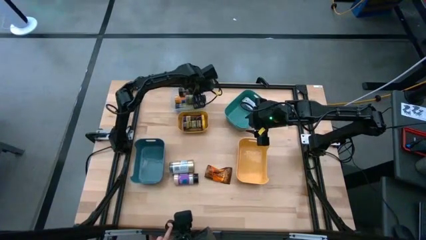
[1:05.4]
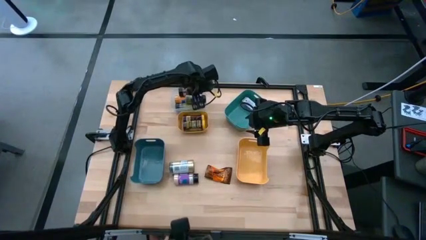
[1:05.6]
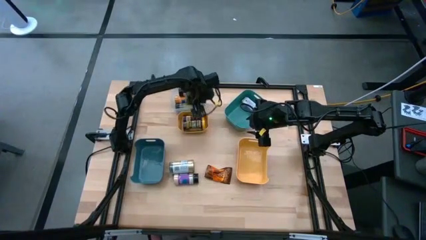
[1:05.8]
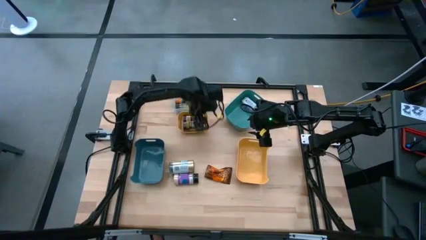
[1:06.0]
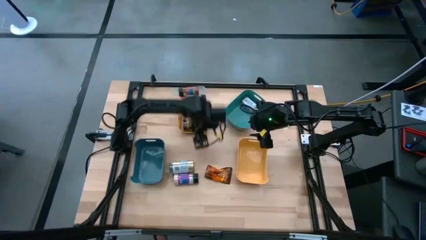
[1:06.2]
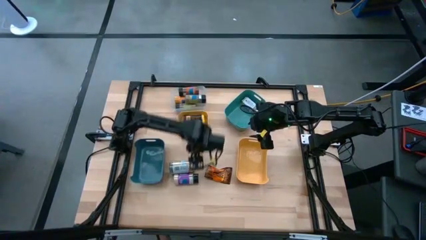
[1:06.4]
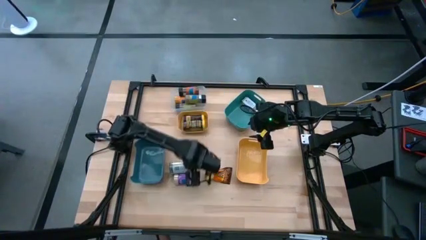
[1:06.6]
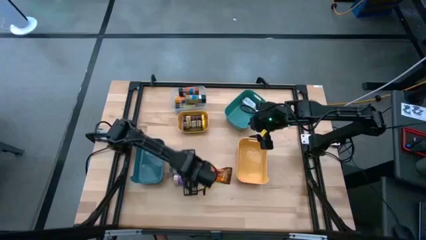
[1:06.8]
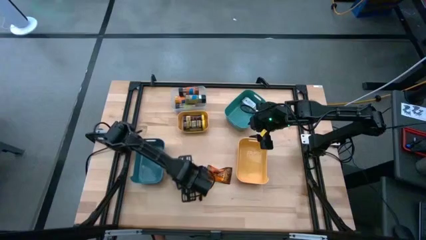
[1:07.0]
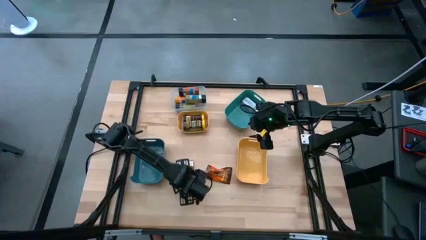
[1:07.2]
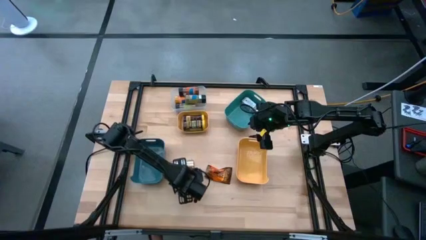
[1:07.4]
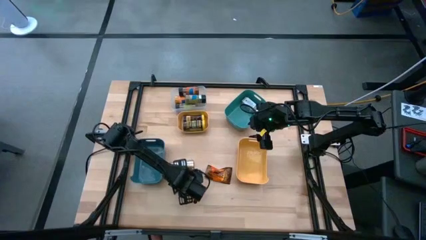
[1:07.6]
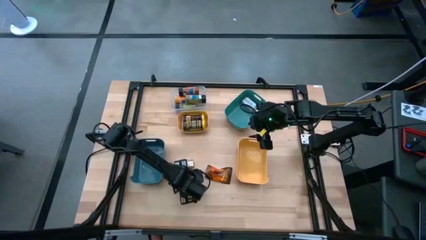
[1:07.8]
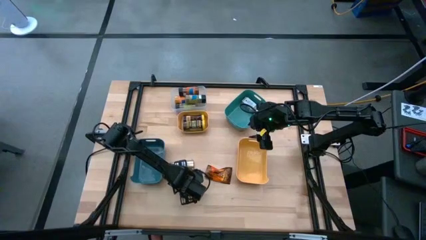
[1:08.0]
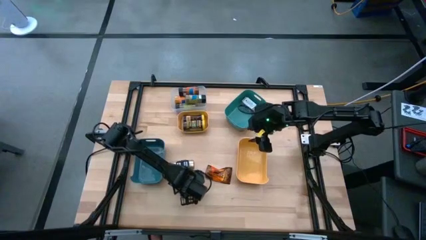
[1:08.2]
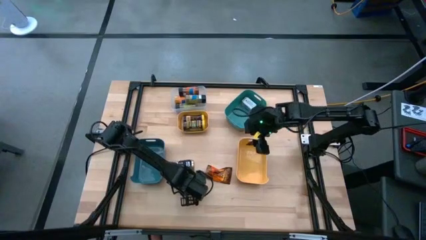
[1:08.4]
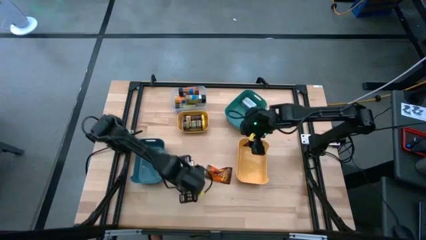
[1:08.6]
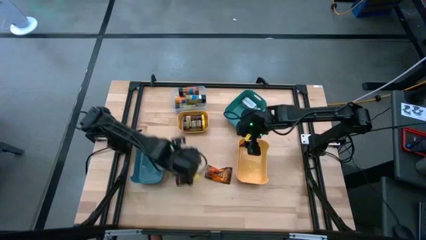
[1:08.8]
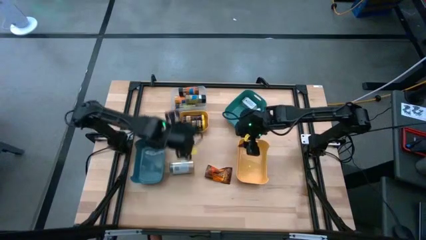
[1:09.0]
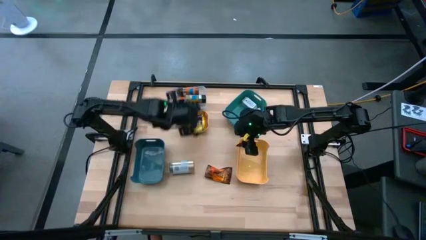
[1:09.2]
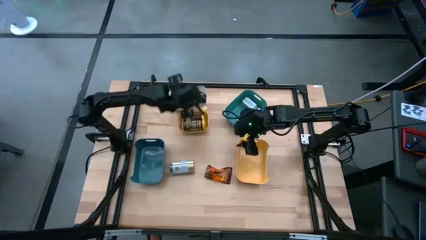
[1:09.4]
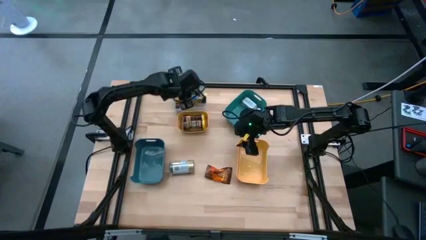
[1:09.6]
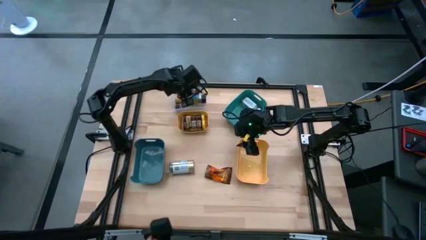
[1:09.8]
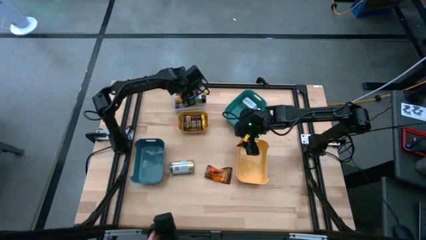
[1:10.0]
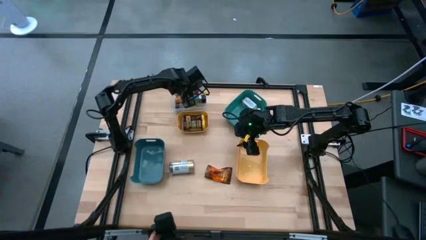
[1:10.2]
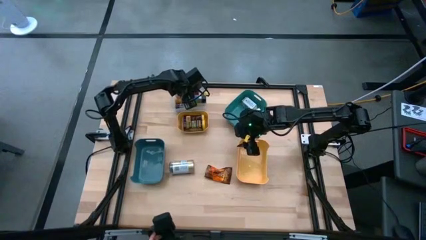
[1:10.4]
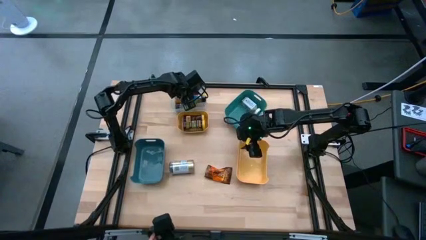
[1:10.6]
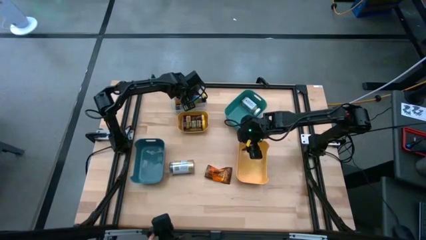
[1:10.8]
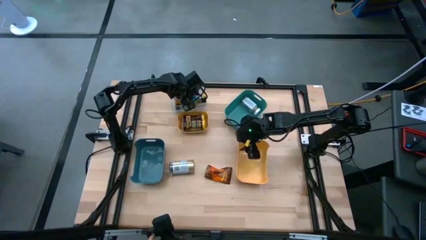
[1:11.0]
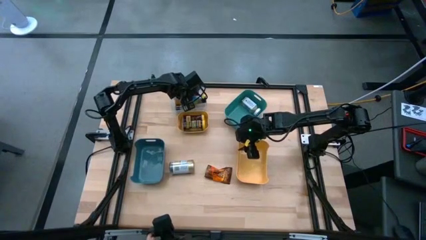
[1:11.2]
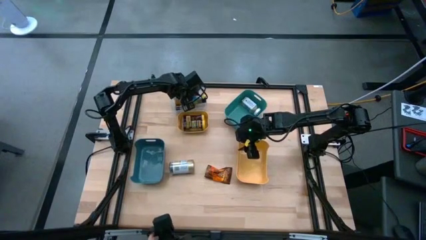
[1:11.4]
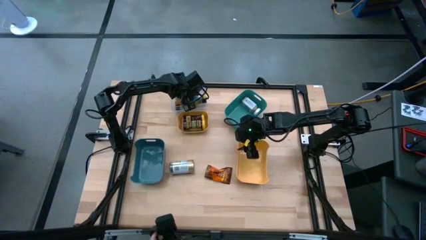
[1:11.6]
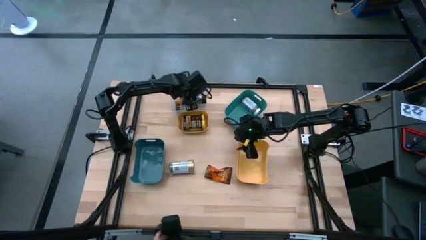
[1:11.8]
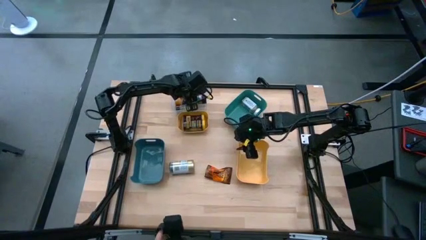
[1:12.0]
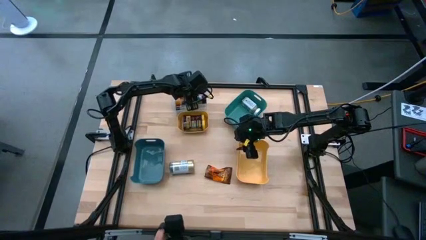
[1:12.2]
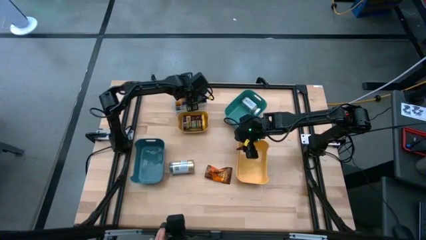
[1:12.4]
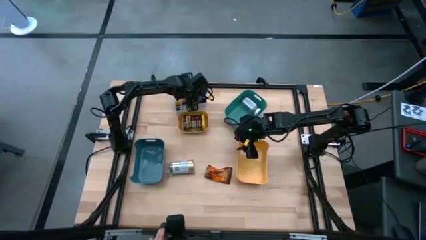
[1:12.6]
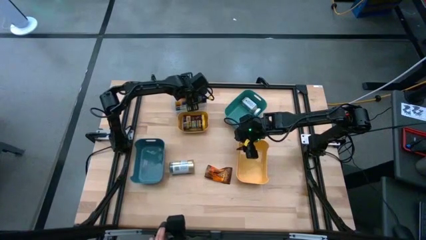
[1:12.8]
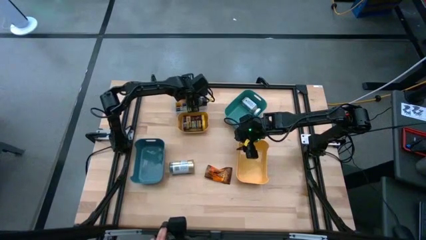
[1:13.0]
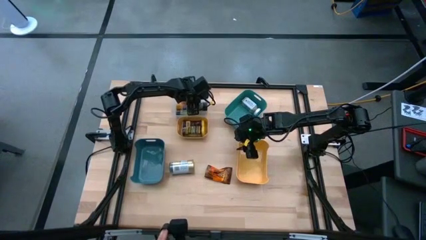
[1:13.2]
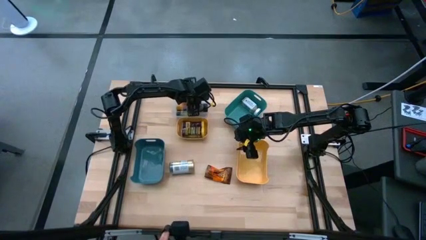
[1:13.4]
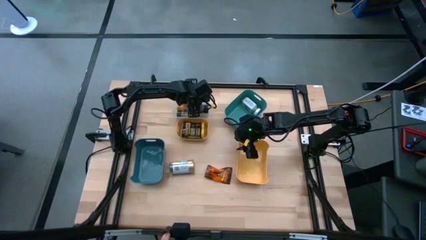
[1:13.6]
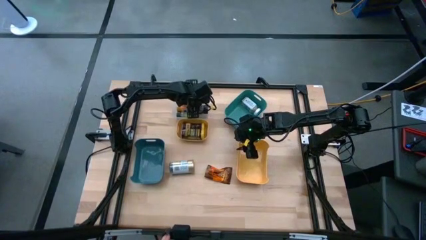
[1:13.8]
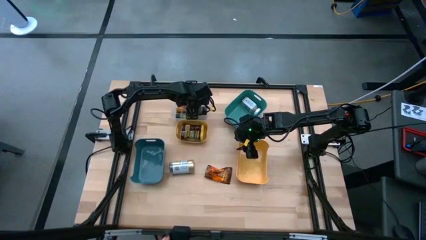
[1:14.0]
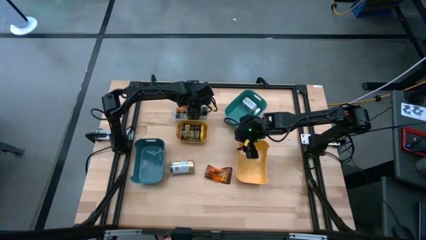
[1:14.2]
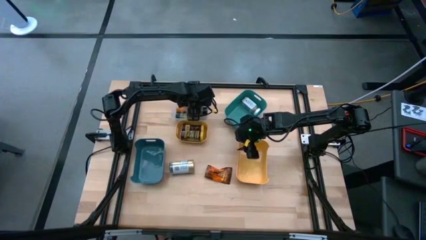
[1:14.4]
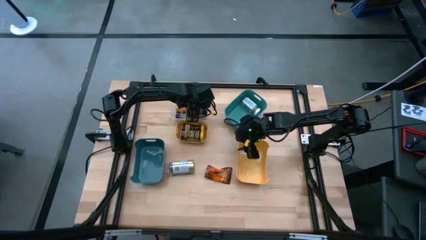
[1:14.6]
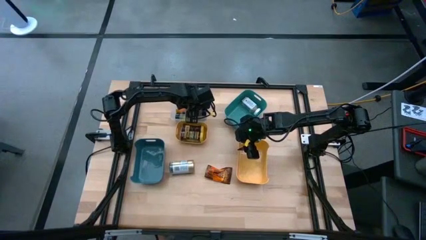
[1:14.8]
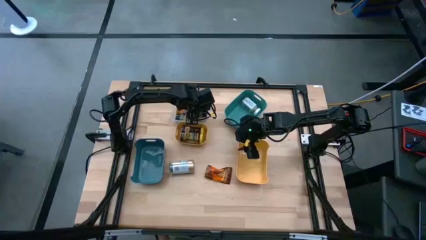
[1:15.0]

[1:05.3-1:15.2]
Task: Sort spices by type
Put the black seasoning bottle into the transparent bin

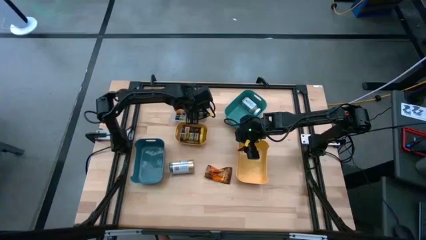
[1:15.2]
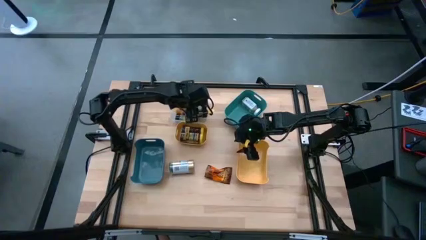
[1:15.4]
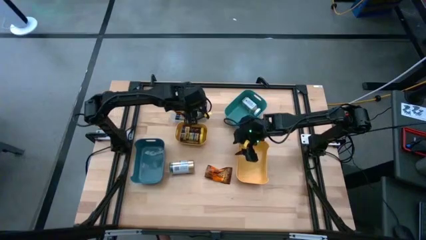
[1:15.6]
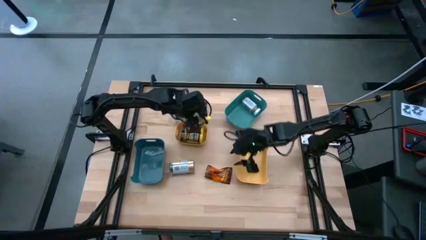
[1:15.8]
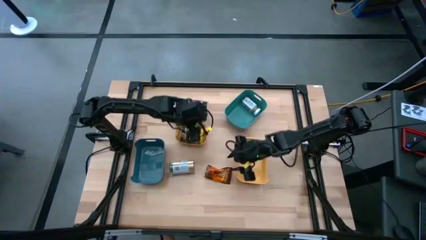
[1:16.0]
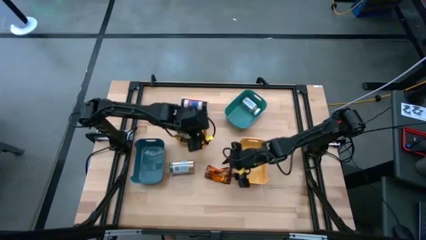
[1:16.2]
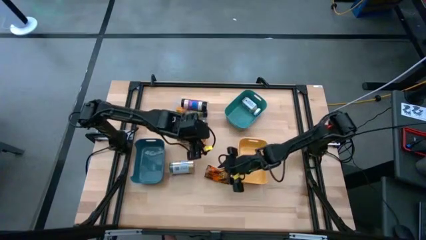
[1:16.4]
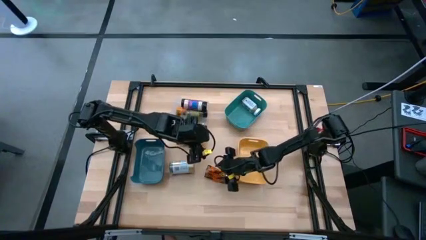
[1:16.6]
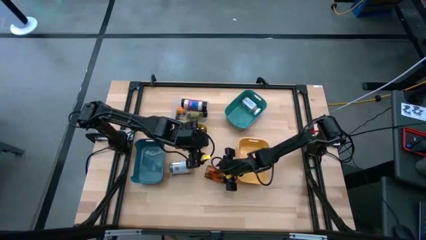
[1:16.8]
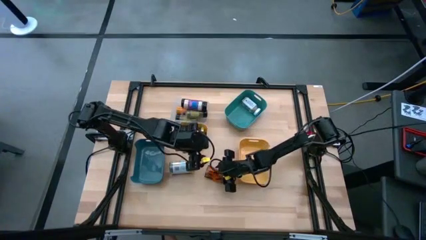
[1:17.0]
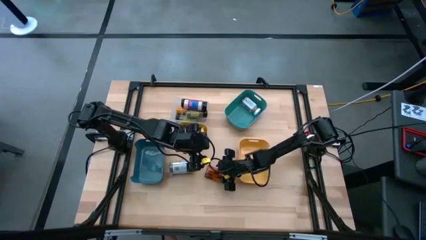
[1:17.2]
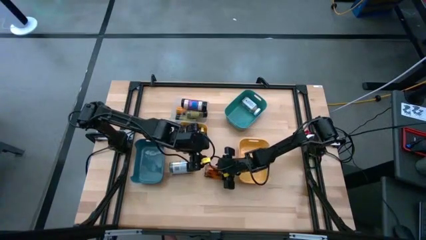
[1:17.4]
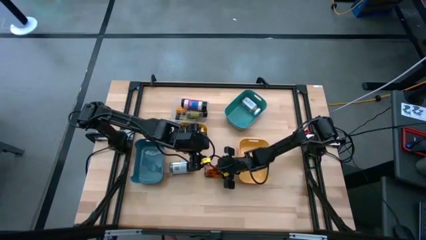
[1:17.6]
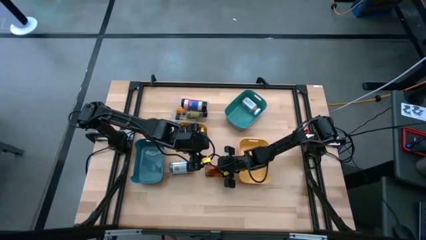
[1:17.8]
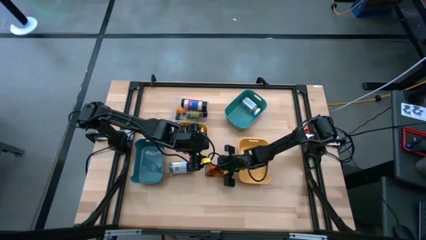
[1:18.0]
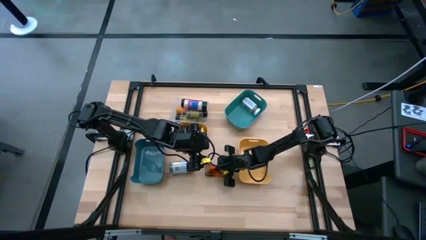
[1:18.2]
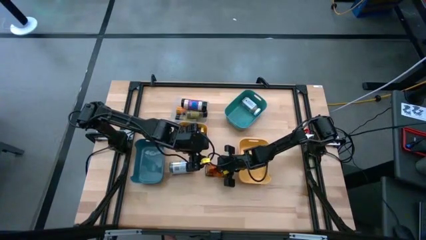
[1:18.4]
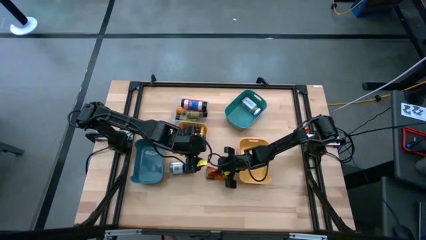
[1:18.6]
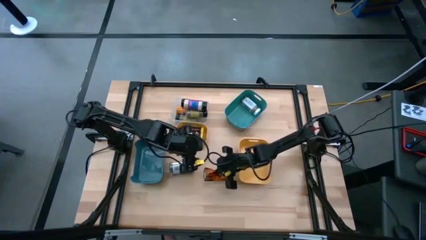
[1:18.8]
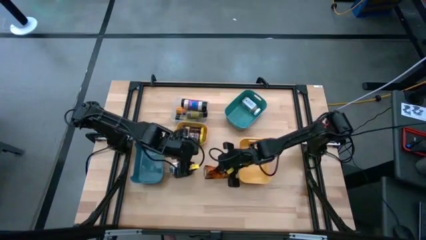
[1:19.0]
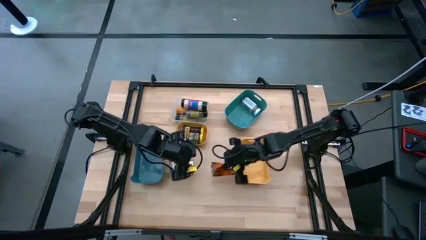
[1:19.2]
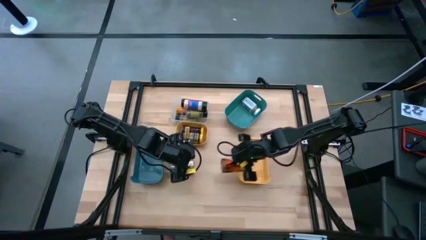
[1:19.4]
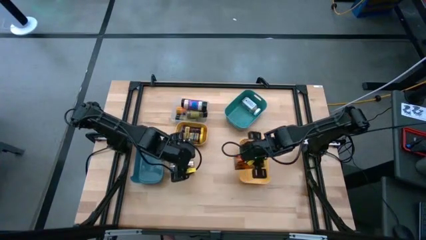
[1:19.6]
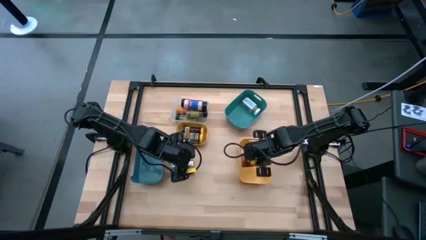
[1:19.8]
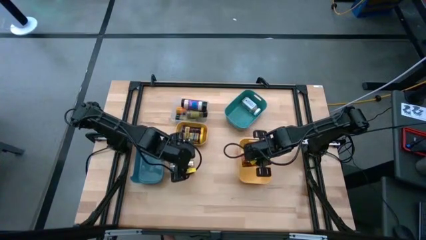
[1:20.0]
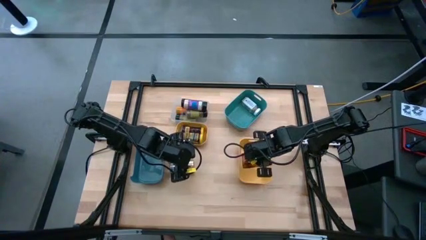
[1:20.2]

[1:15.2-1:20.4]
Put the orange seasoning pack into the bottom yellow bin

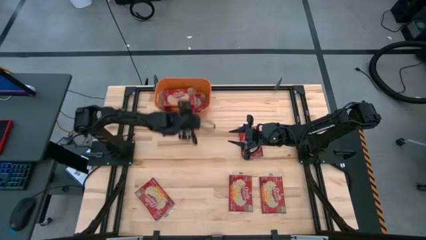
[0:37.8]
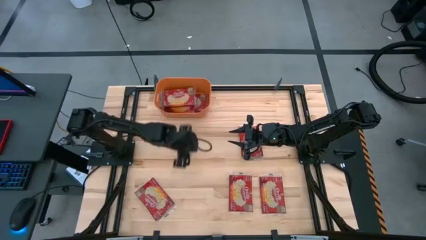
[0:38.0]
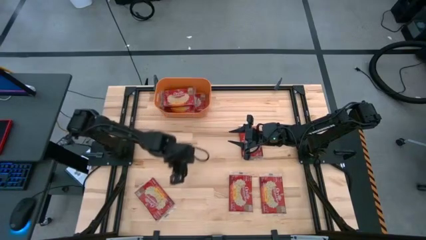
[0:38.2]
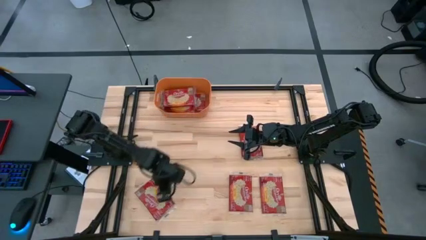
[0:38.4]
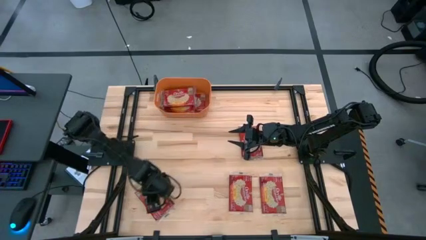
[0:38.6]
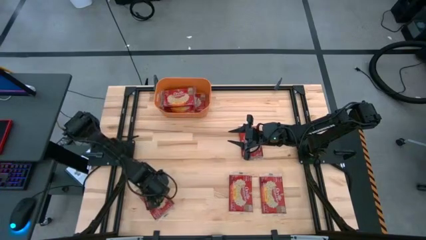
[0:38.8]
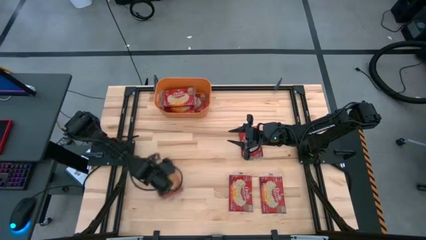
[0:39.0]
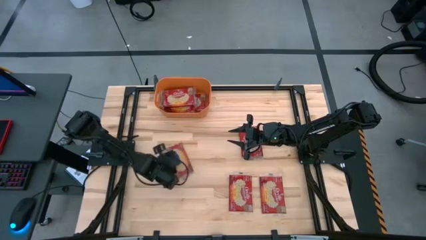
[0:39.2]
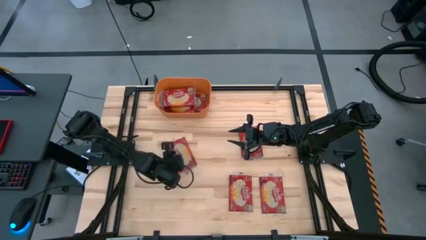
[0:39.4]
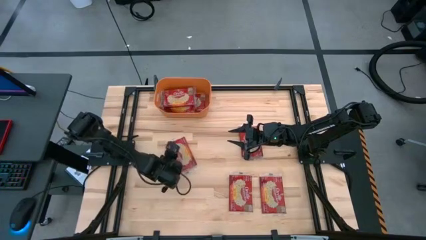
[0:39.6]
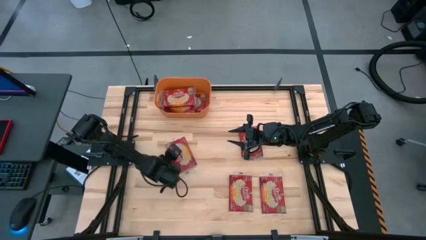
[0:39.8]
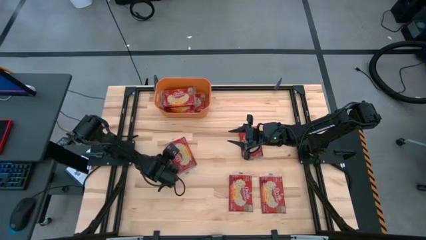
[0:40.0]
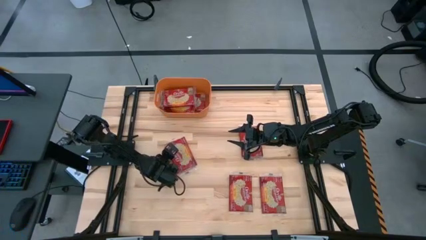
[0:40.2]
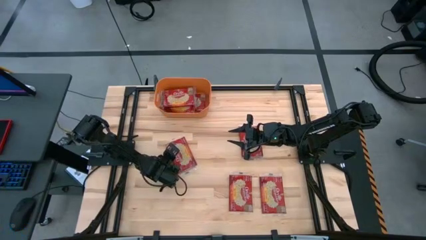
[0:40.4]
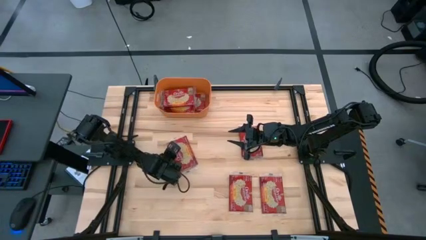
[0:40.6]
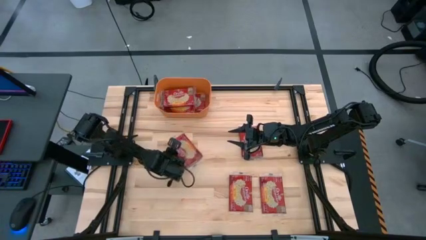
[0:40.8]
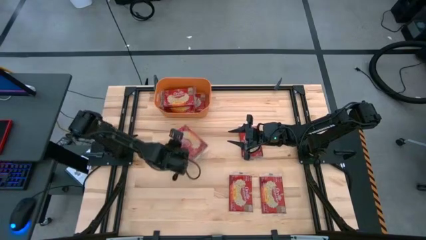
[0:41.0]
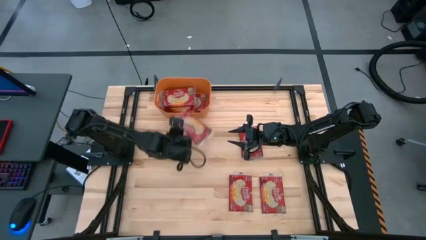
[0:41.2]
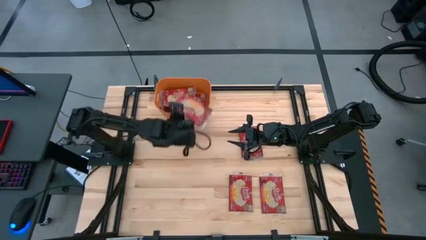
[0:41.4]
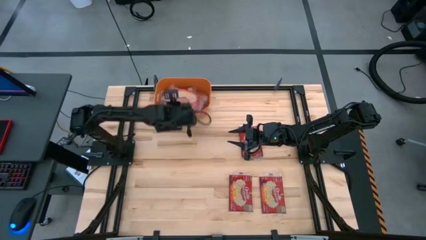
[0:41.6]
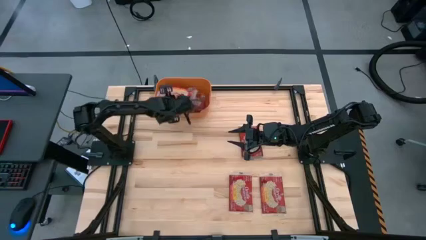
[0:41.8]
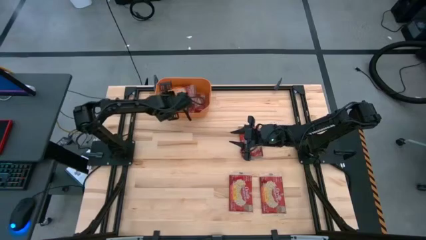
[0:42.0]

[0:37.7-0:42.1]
Task: Sort popcorn bags into baskets
Put the popcorn bag into the orange bin
